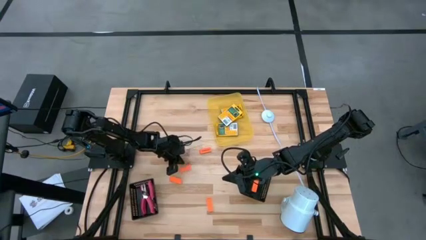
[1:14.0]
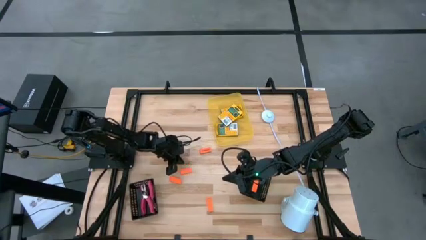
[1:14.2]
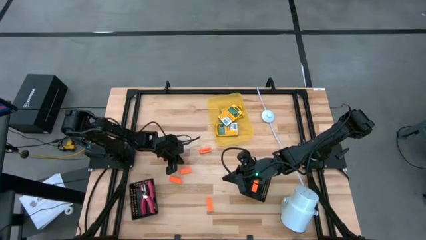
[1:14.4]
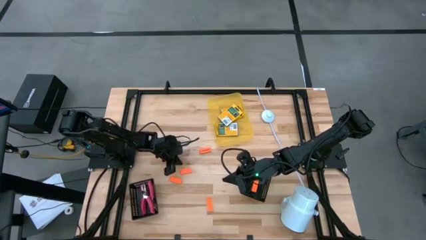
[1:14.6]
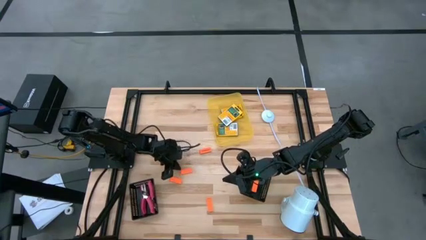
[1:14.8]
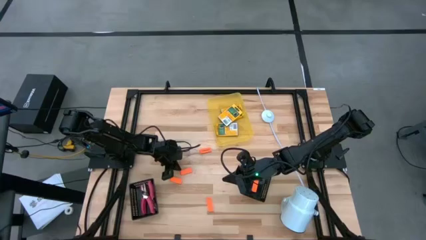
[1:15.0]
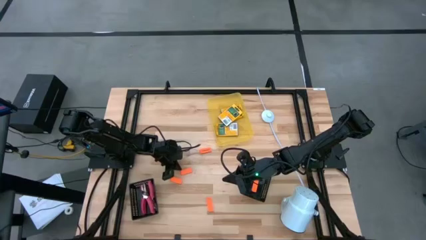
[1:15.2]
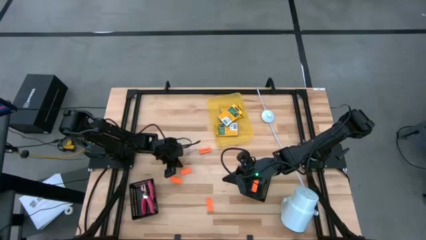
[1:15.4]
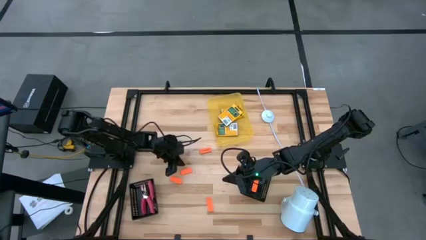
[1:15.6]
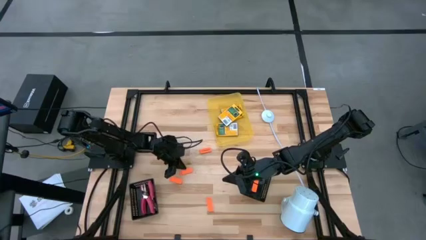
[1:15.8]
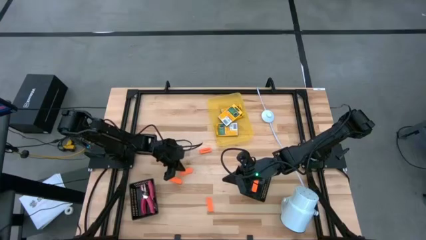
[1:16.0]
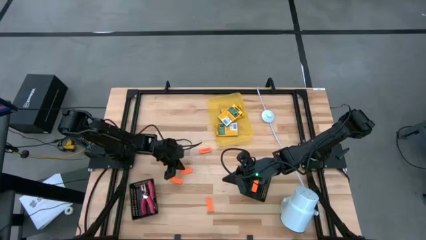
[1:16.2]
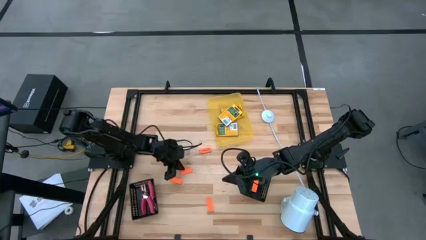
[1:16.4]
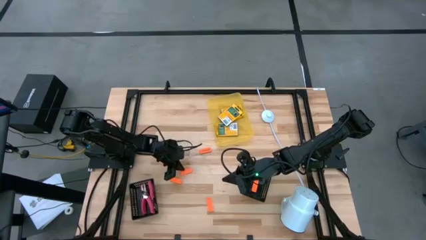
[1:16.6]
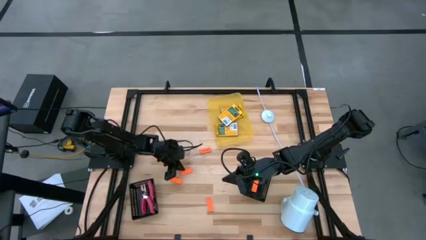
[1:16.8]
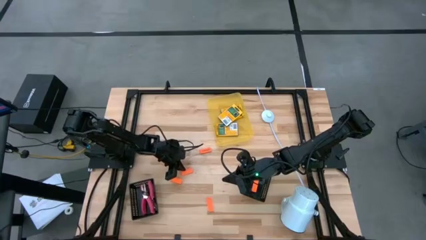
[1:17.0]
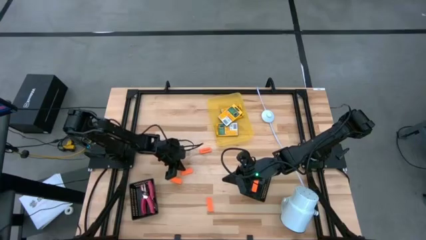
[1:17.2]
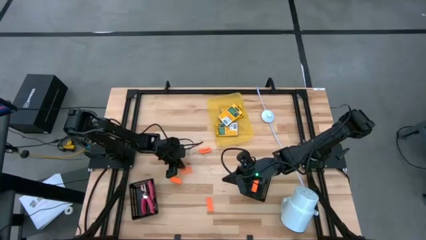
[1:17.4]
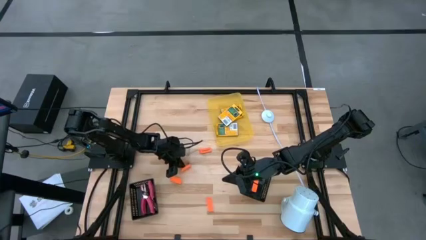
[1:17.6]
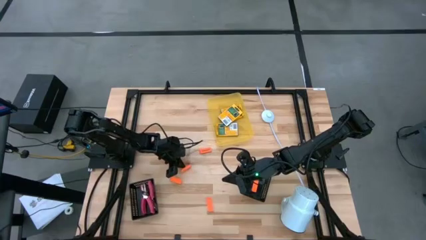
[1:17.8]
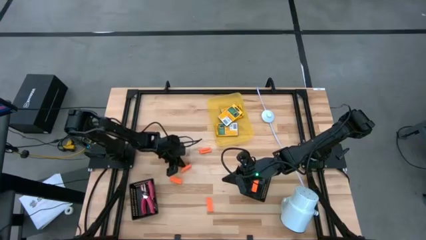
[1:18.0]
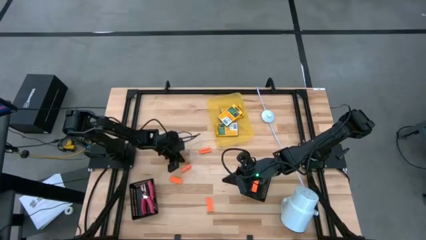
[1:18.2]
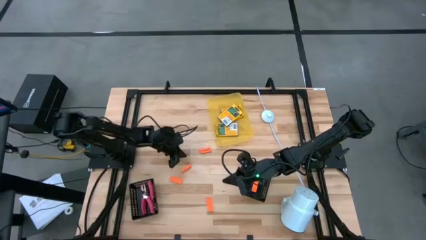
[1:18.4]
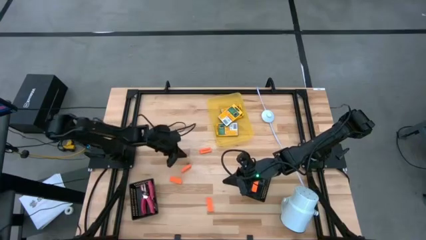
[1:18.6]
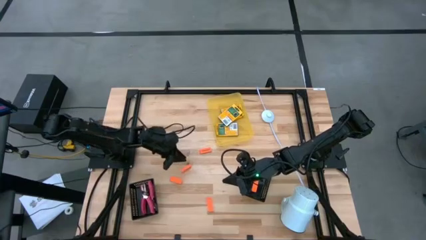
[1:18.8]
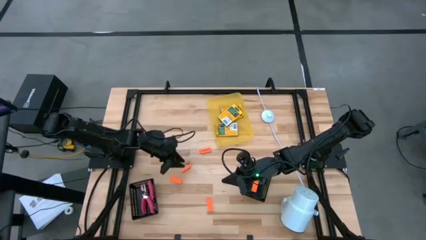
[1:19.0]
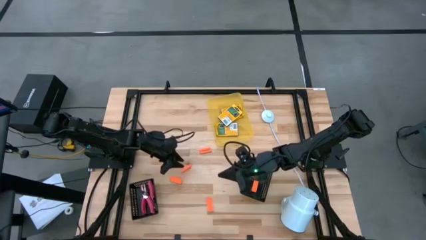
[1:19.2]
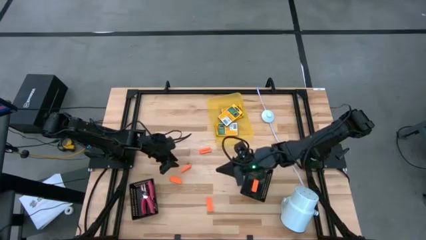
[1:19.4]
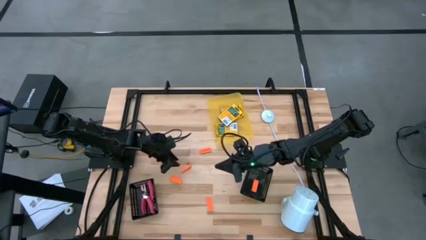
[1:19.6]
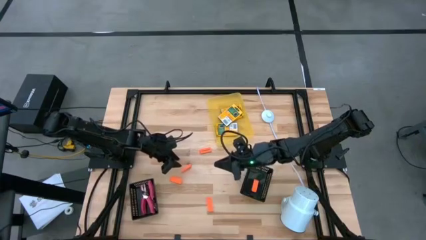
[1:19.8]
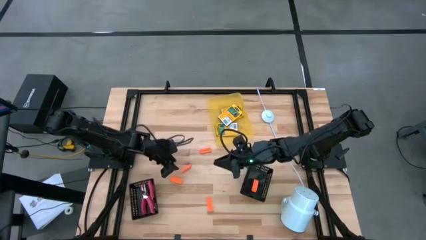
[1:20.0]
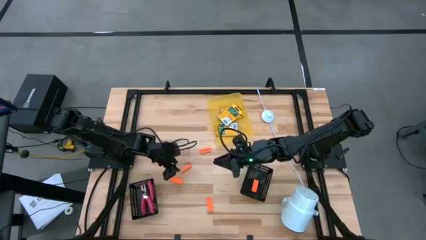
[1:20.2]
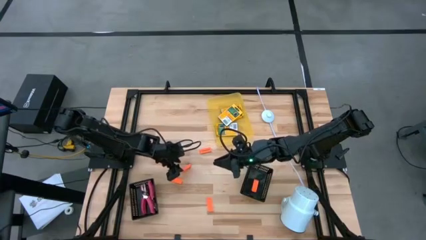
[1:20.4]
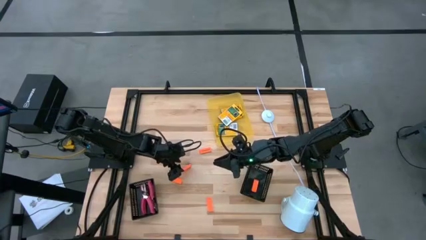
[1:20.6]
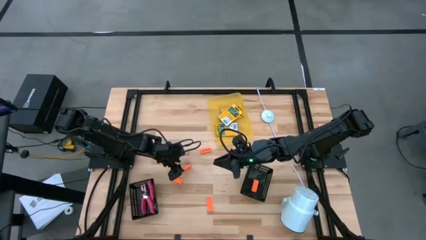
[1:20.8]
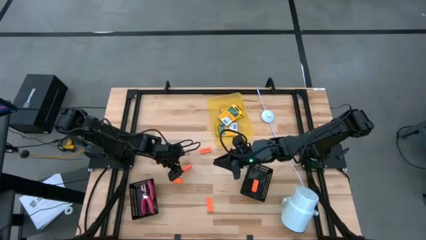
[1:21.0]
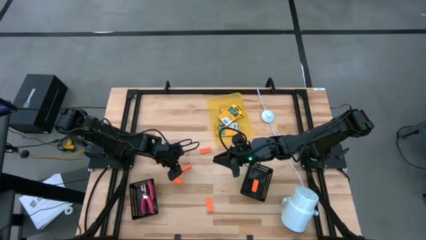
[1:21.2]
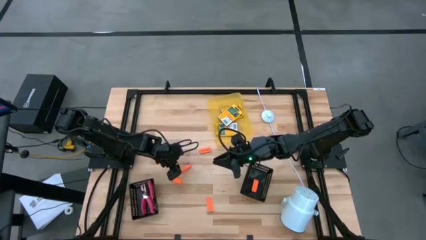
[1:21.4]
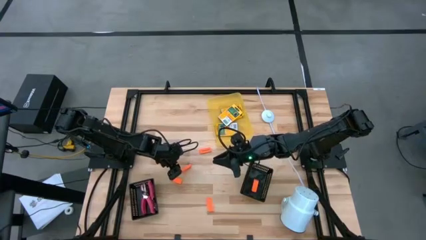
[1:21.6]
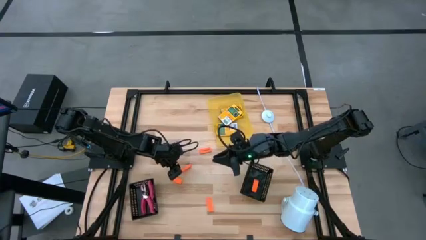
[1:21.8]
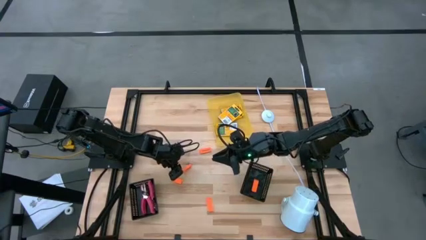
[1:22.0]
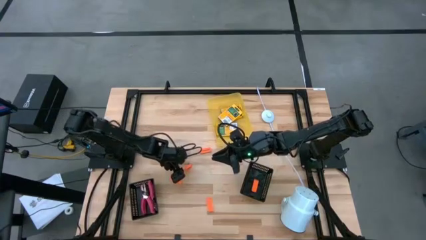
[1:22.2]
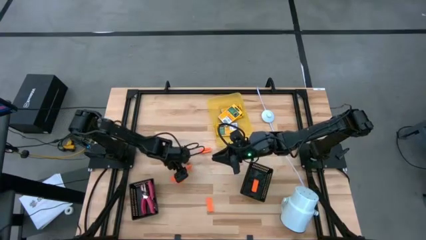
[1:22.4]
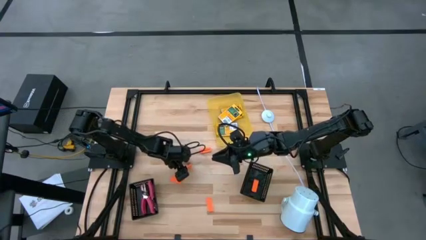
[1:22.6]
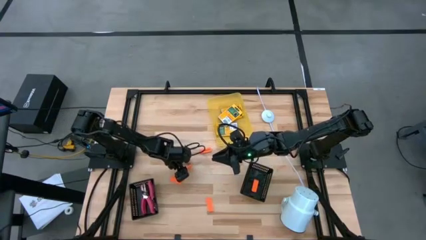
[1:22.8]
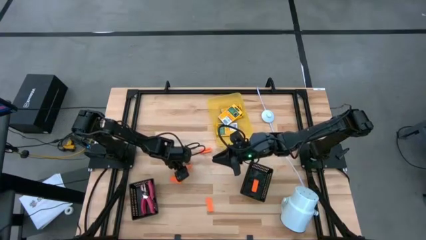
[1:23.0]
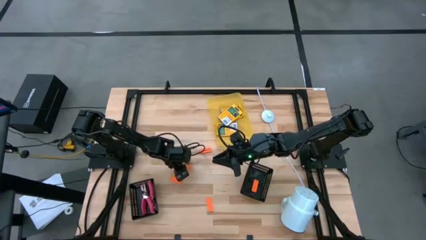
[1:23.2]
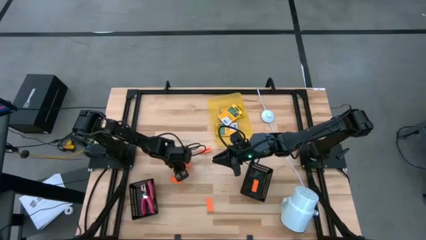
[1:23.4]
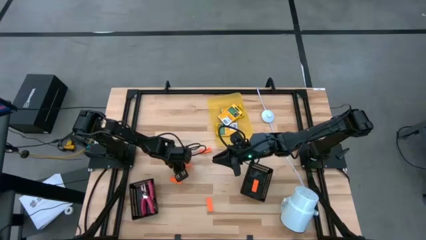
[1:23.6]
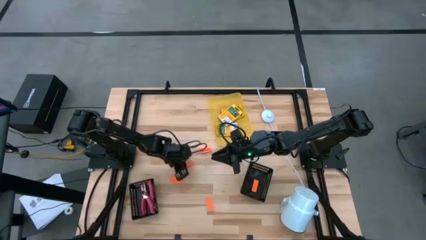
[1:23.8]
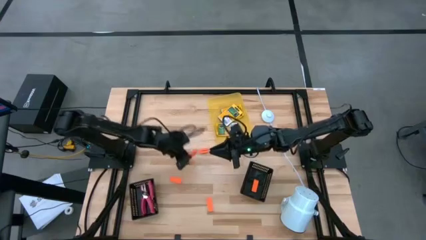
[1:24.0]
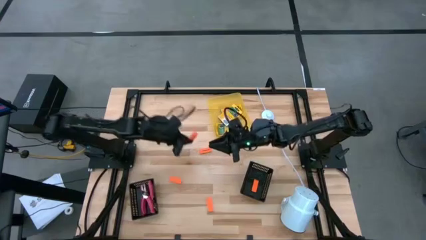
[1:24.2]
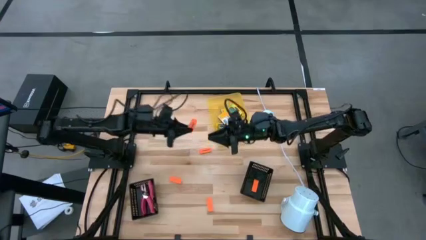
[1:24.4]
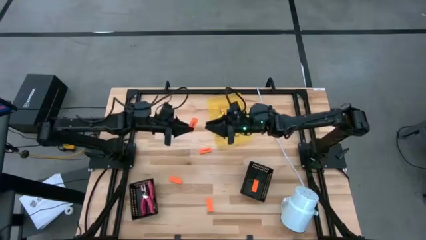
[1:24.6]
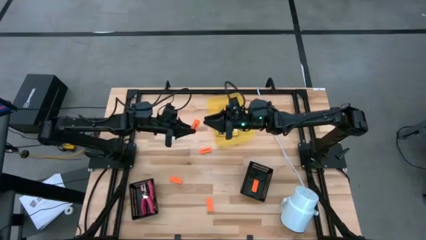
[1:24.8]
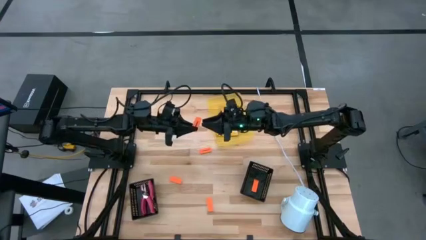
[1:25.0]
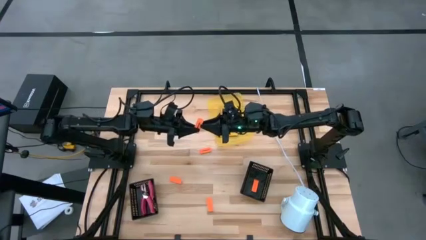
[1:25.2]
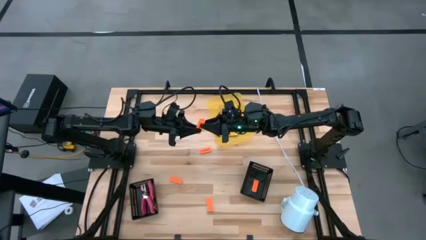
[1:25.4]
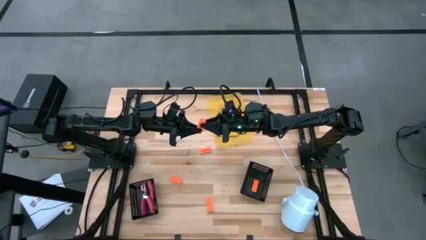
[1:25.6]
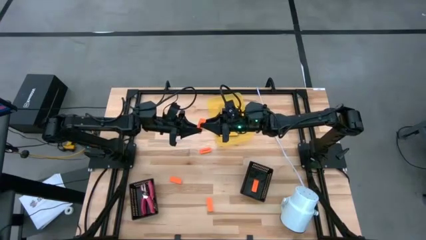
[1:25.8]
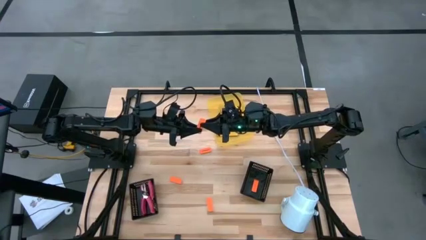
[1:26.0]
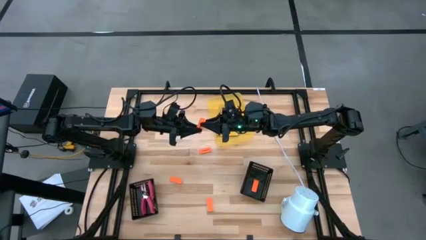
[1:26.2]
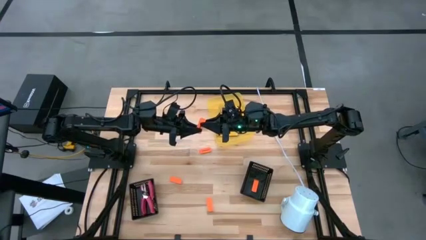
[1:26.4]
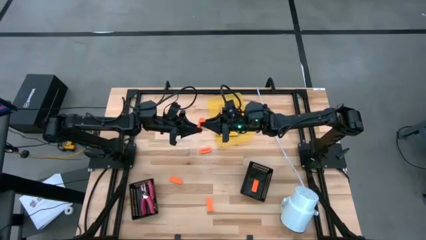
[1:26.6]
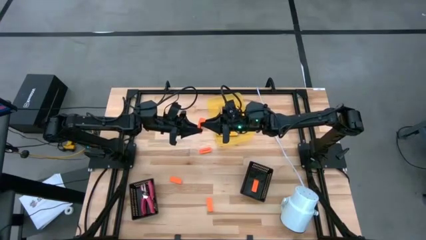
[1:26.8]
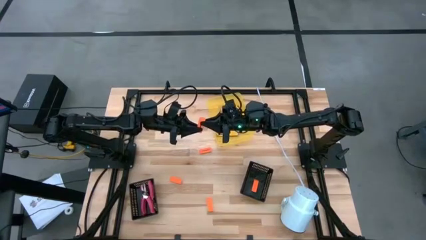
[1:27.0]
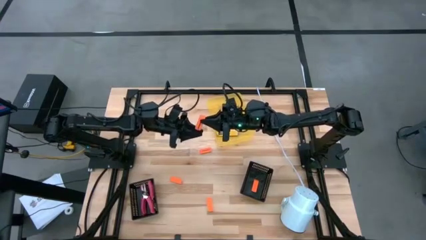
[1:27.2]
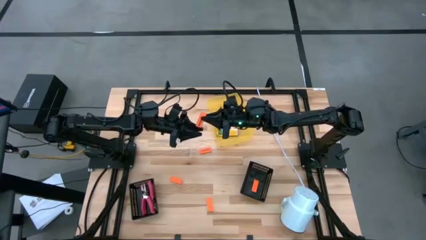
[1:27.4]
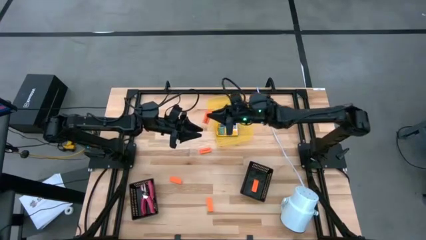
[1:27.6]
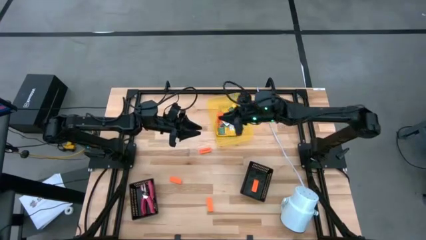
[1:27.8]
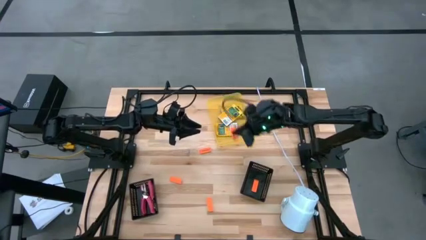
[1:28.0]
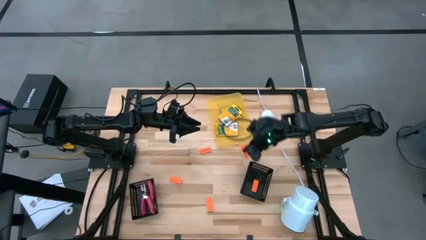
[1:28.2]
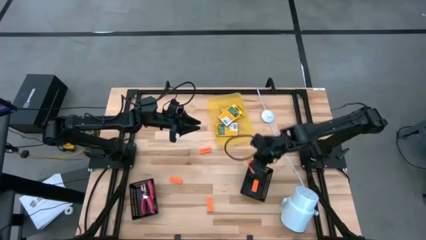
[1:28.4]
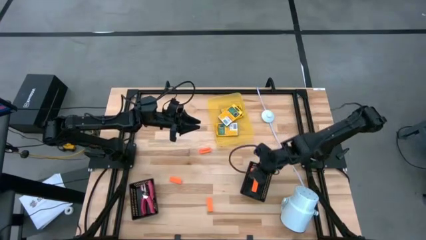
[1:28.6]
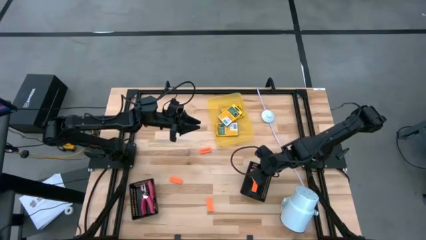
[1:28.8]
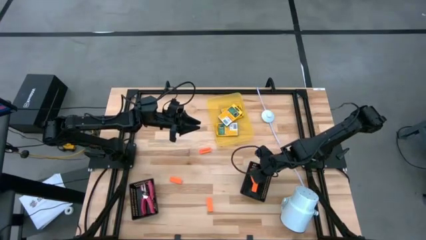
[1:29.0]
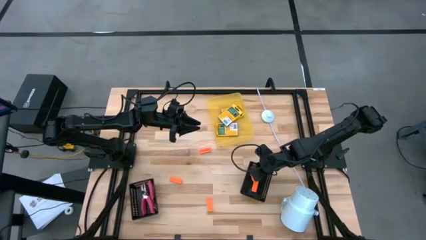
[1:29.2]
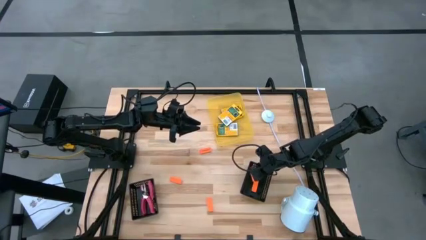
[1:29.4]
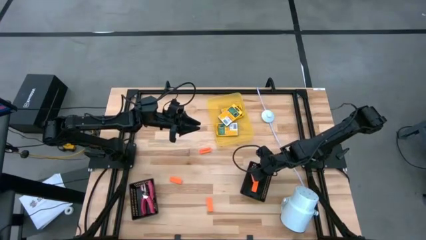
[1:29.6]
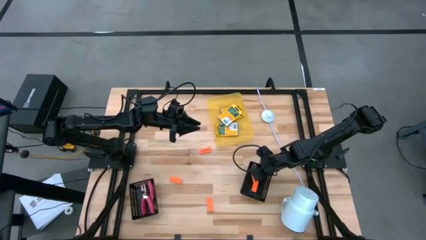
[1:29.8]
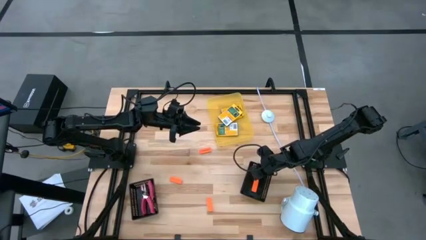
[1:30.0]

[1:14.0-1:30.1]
Task: Pick & Place School Supplies
Put the orange eraser into the right black bin
